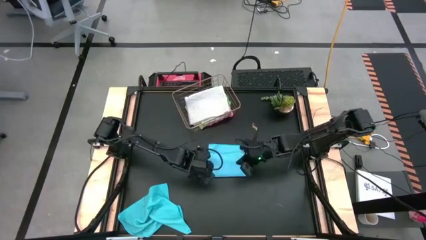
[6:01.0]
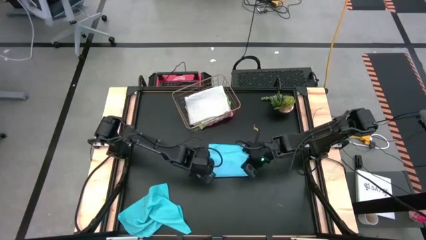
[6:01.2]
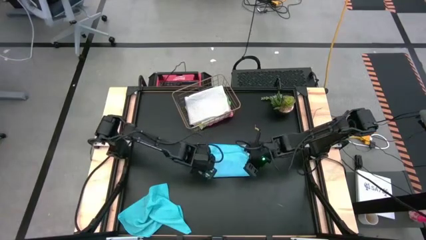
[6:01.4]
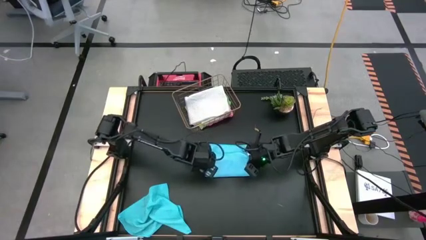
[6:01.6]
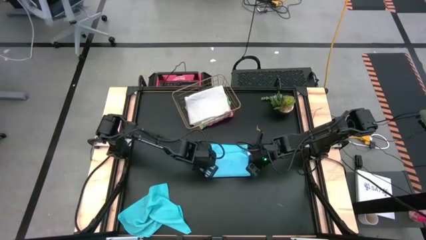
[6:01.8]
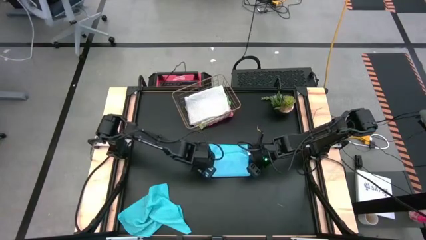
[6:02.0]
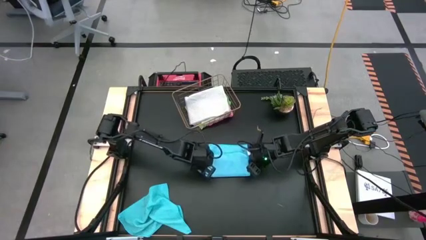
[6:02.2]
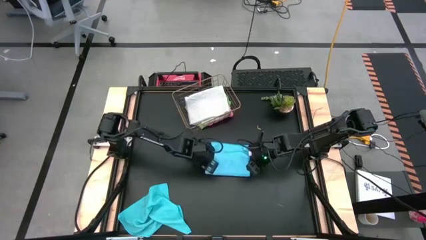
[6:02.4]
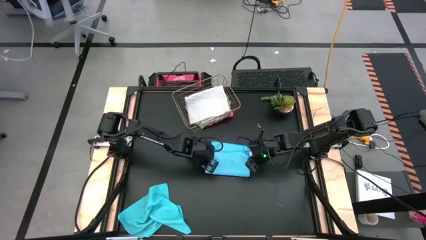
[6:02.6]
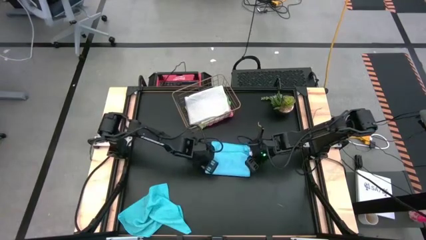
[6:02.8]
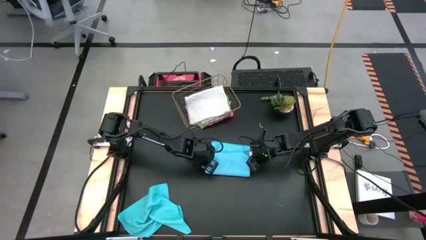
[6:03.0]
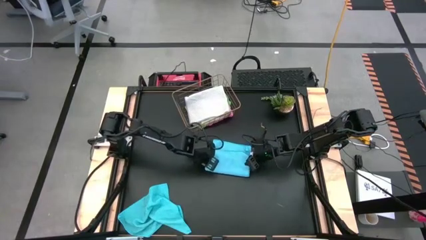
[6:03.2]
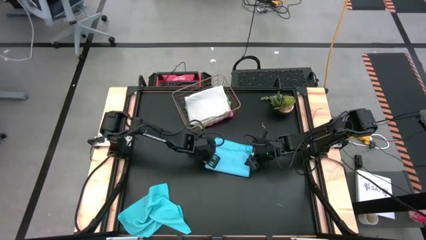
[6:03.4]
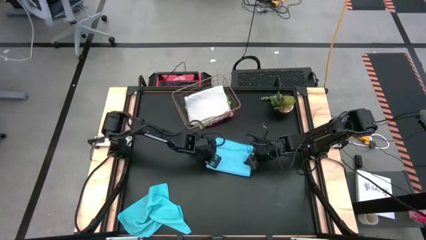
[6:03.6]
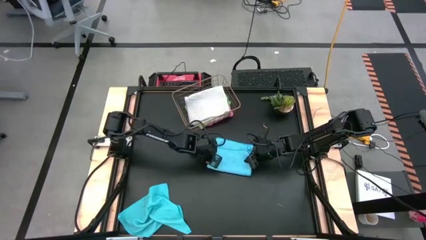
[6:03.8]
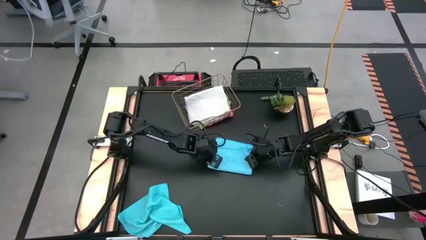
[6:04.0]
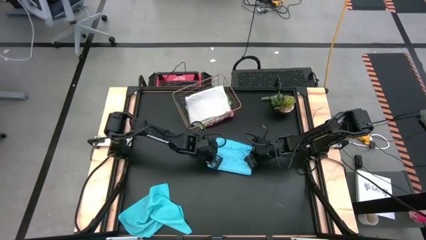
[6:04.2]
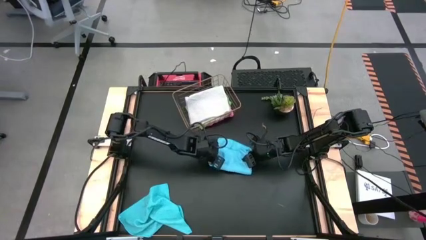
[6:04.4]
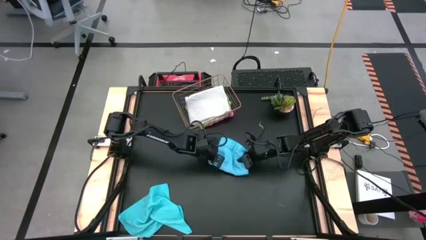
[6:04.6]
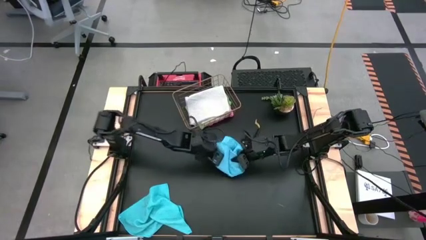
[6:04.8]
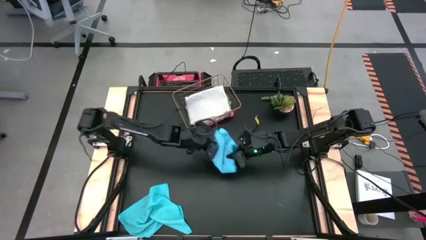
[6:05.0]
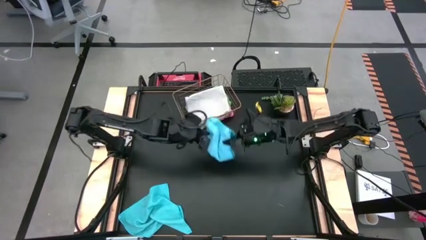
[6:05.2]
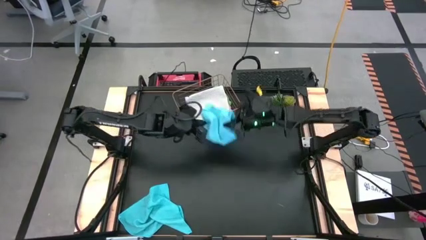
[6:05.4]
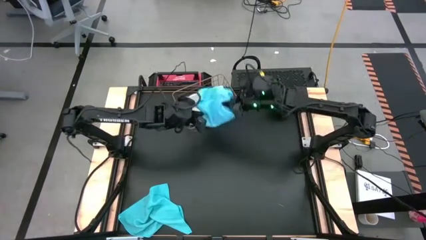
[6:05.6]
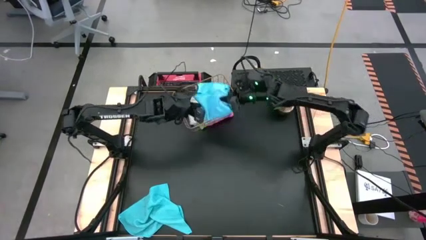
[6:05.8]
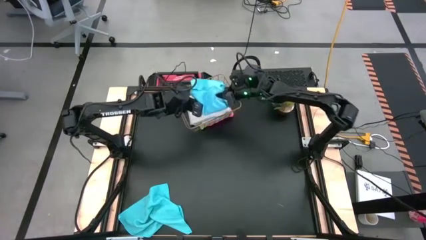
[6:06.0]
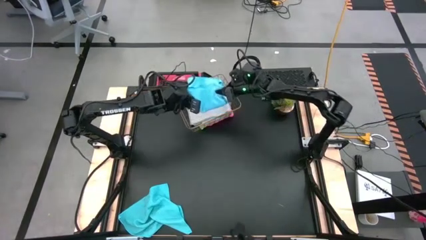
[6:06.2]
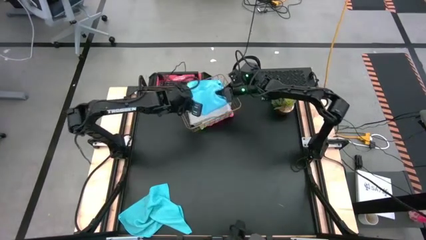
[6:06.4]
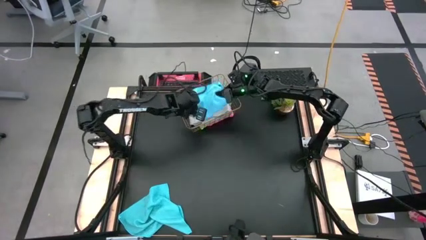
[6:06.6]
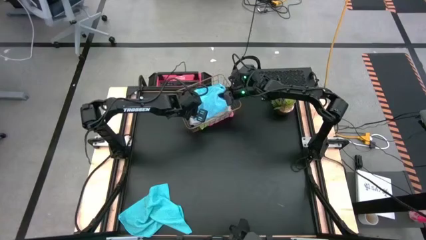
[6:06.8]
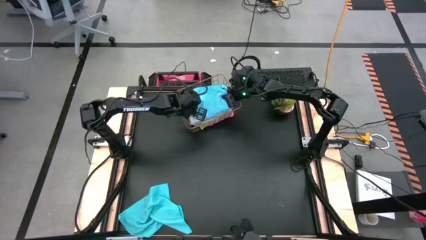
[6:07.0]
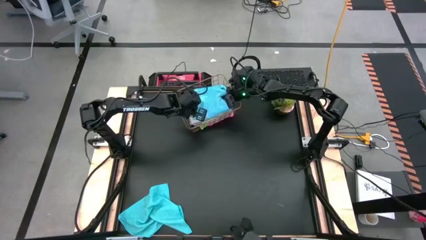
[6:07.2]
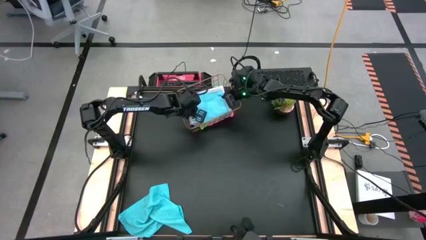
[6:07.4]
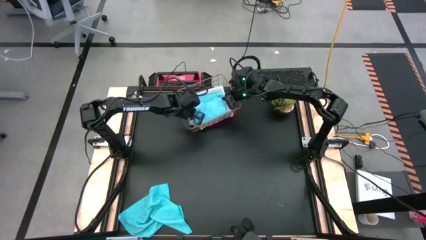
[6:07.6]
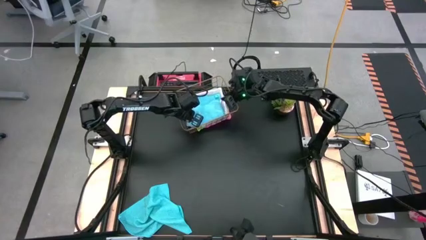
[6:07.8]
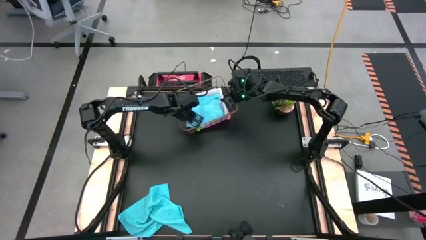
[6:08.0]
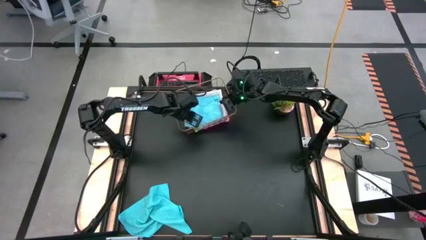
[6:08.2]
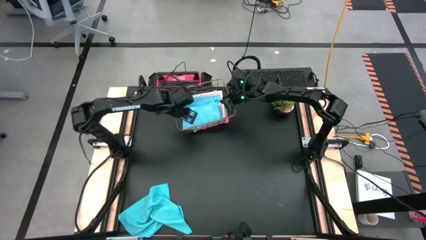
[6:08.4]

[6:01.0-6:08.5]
Task: Fold microfiber towels
Stack the folded light blue microfiber cloth on top of the gray microfiber cloth in the wire basket

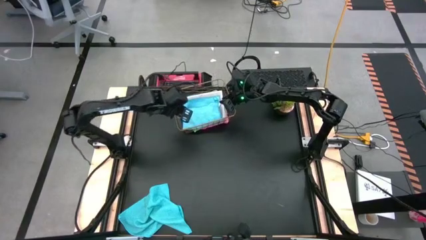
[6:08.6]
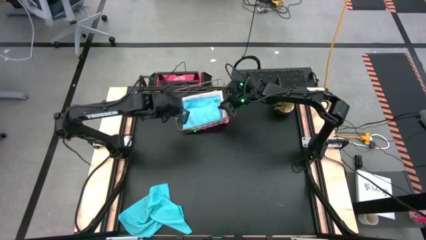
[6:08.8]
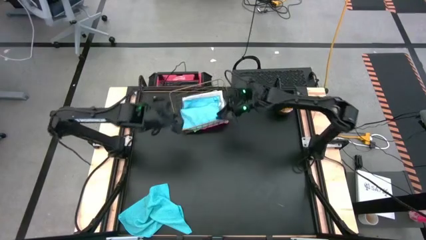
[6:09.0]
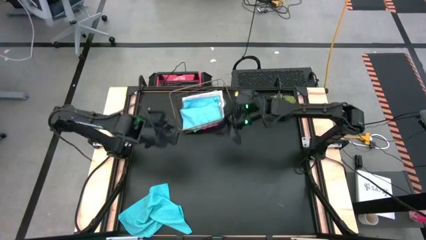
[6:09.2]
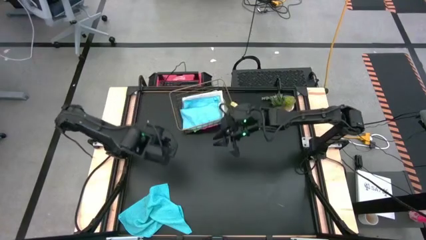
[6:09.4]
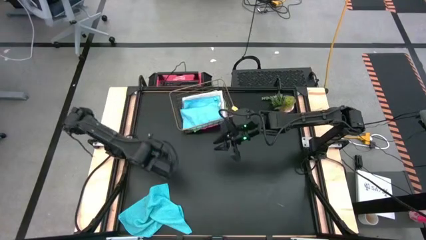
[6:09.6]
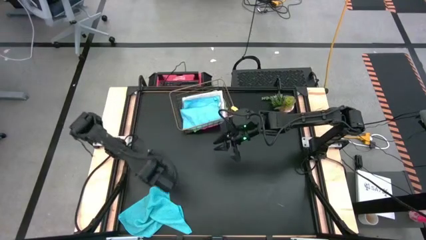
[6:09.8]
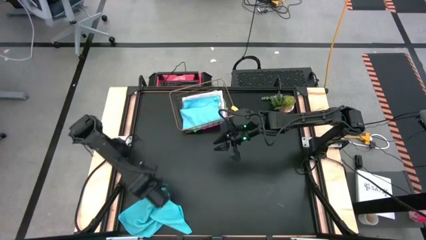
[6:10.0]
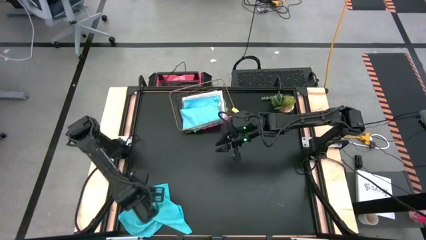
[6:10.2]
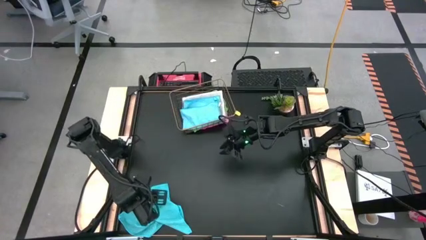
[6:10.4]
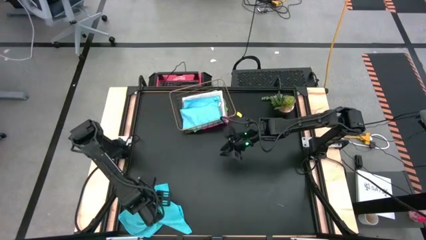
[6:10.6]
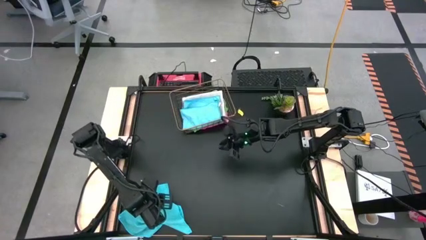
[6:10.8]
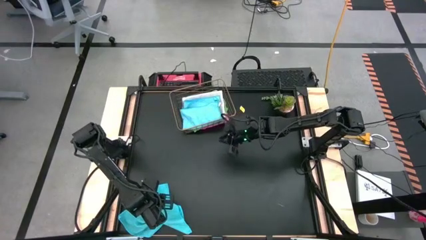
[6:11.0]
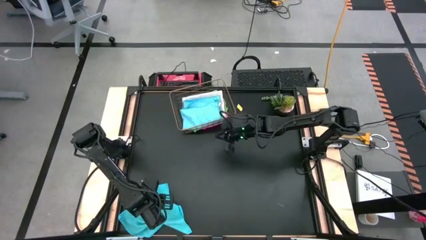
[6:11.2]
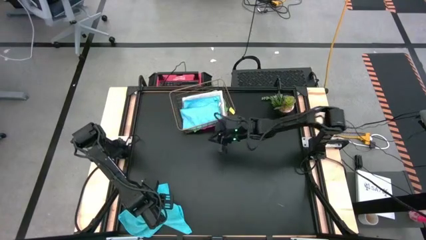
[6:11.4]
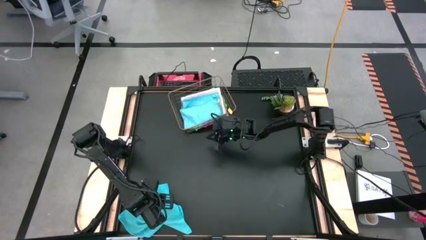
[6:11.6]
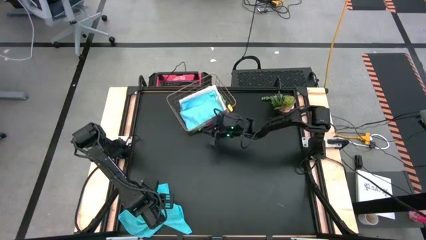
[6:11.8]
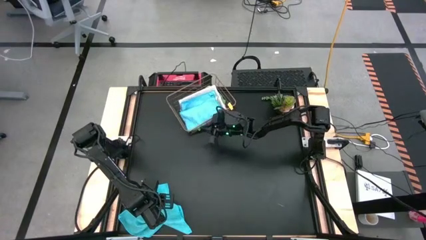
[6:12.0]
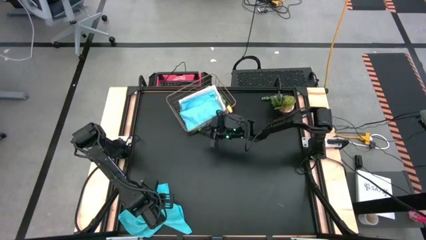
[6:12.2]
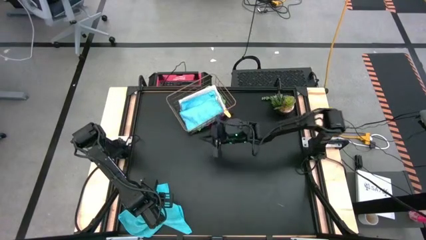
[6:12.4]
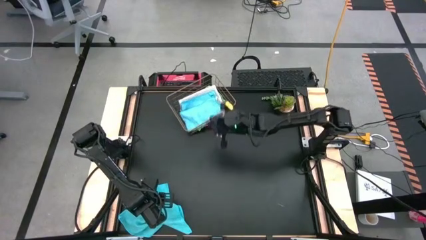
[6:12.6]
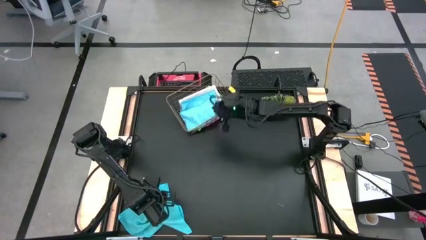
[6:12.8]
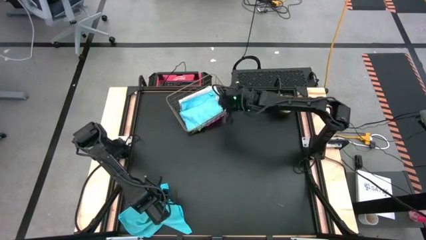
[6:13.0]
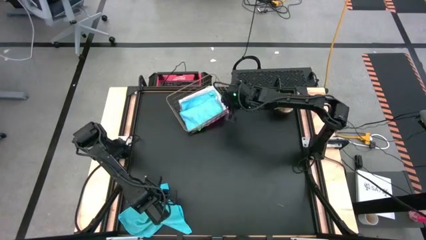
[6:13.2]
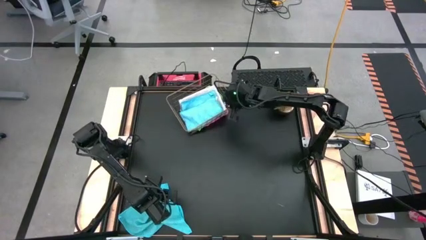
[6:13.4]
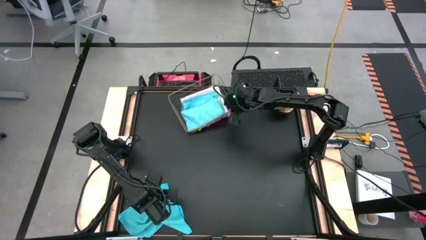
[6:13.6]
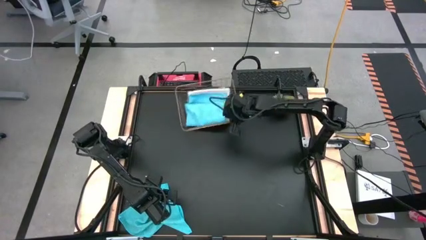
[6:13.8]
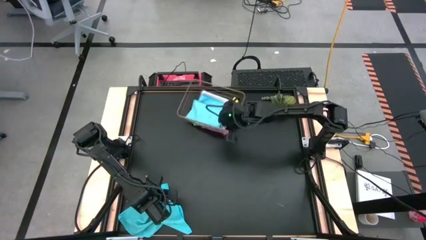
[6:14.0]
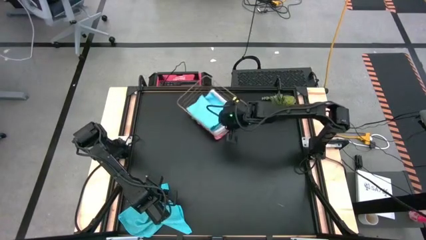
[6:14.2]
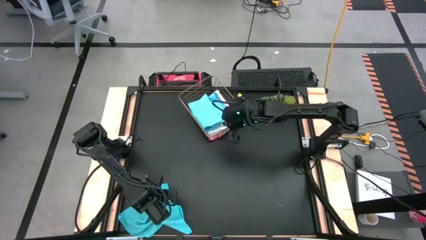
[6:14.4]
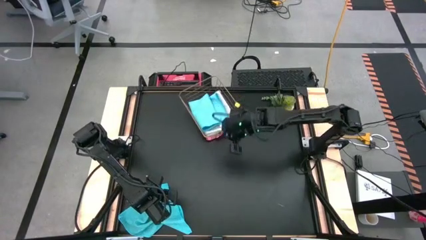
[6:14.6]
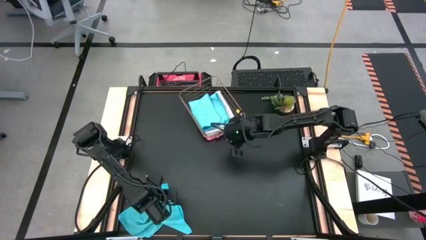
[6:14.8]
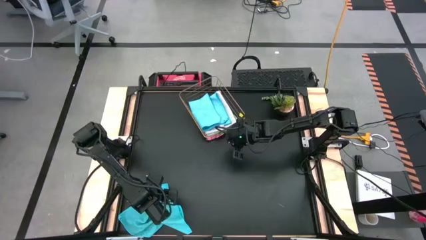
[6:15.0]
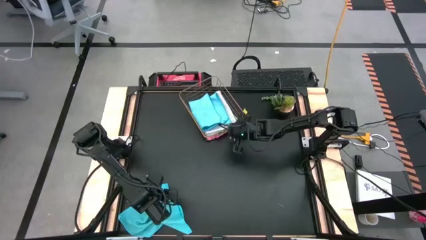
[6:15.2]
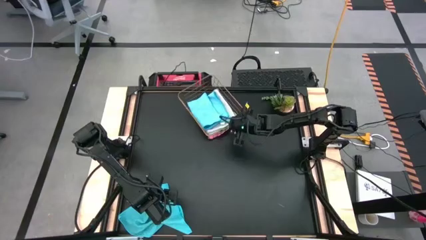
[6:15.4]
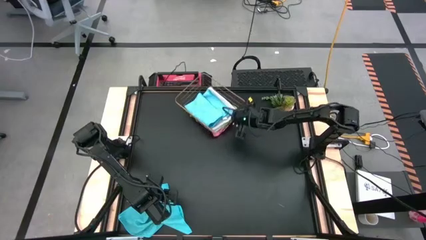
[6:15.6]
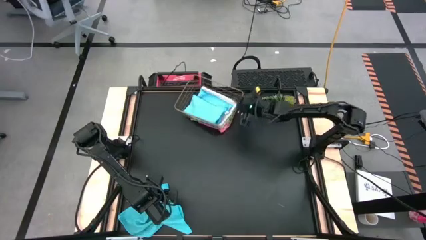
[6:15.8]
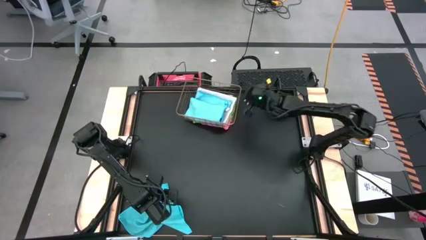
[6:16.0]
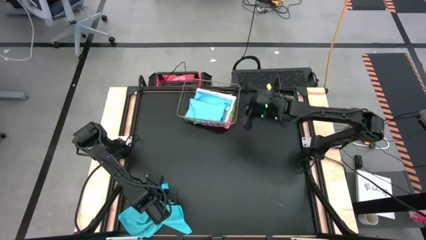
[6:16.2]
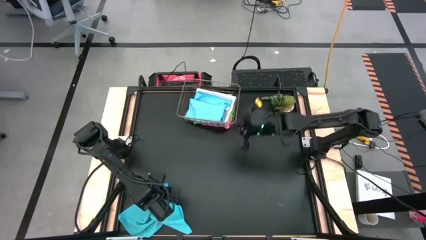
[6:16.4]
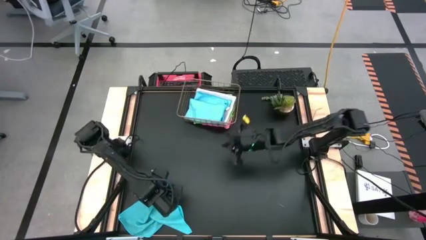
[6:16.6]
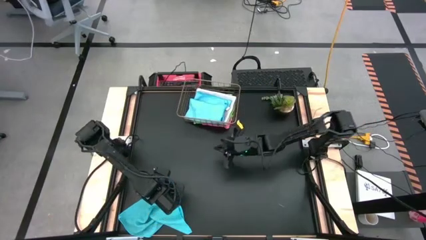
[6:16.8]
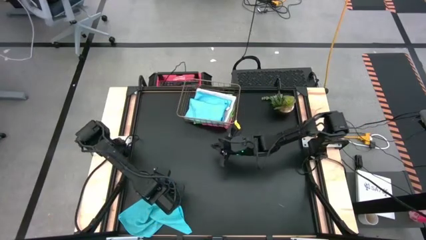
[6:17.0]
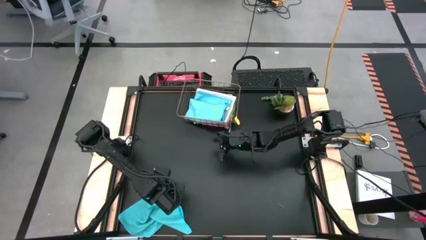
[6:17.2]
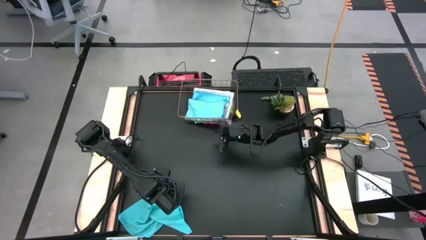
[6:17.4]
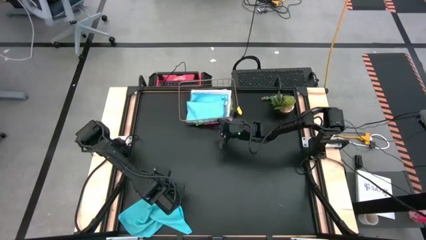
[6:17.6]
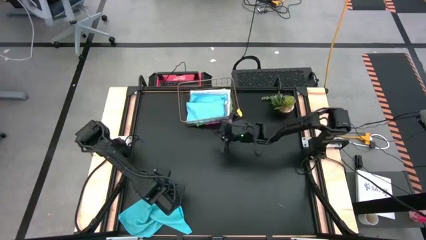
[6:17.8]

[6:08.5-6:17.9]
Adjust the wire basket
